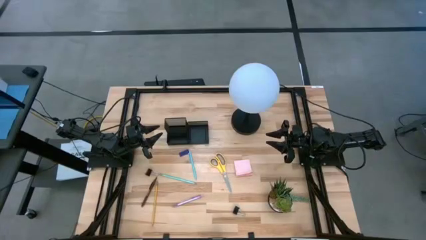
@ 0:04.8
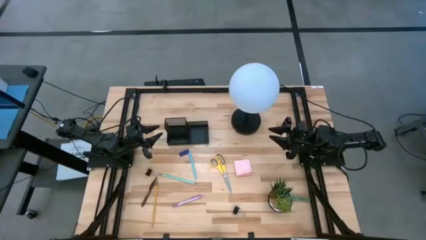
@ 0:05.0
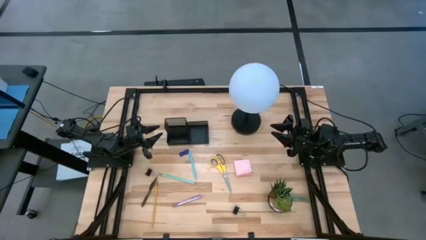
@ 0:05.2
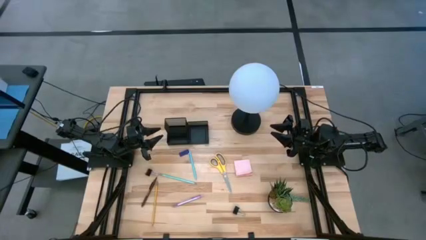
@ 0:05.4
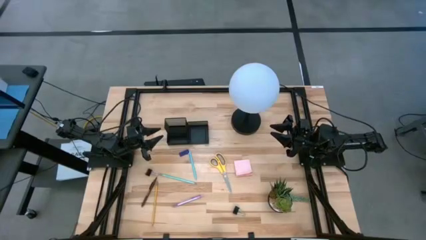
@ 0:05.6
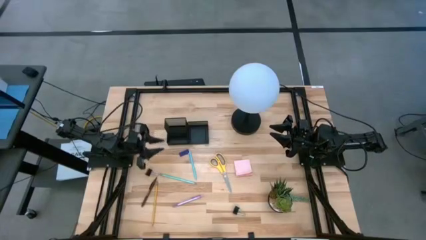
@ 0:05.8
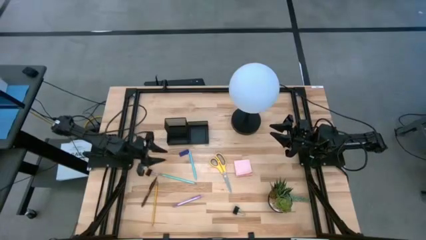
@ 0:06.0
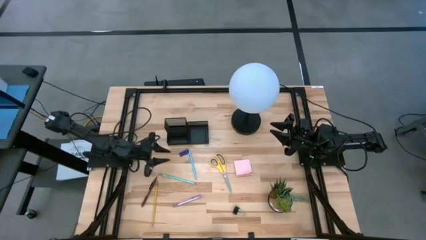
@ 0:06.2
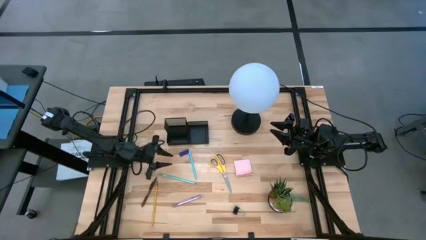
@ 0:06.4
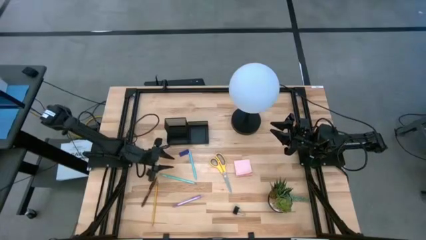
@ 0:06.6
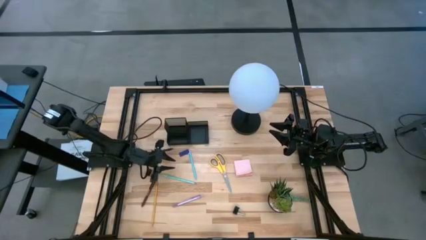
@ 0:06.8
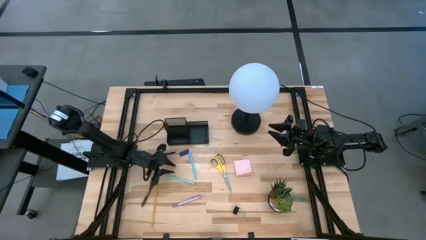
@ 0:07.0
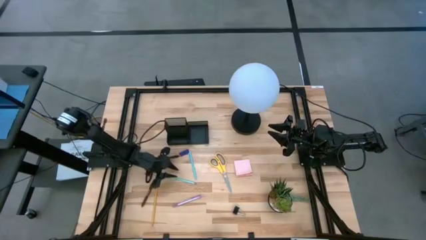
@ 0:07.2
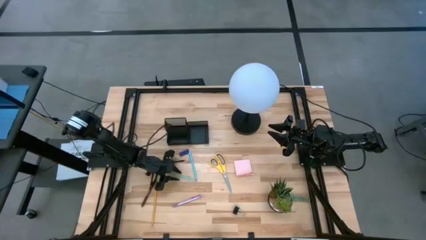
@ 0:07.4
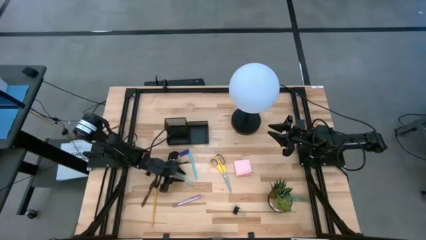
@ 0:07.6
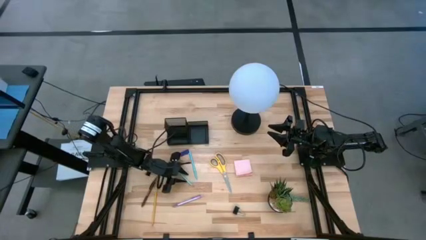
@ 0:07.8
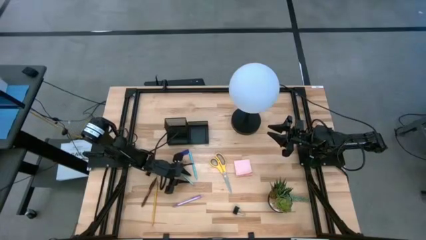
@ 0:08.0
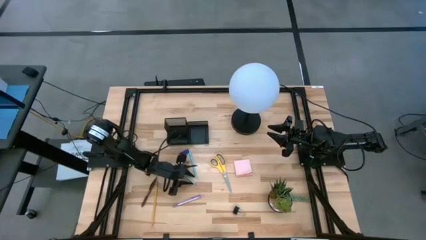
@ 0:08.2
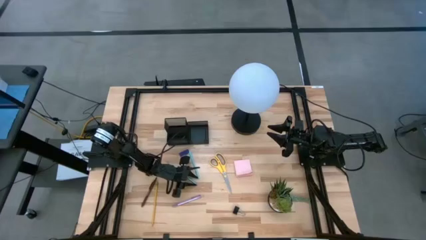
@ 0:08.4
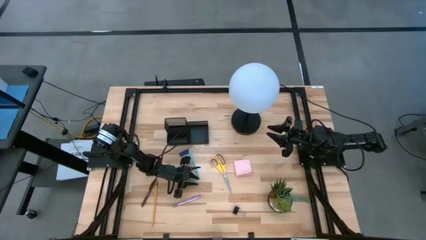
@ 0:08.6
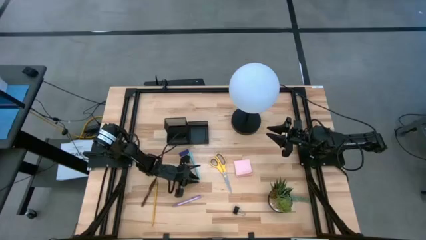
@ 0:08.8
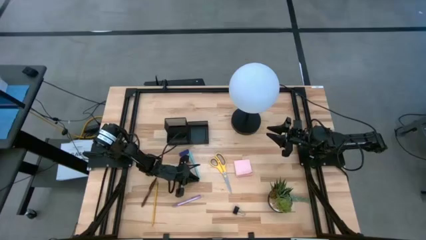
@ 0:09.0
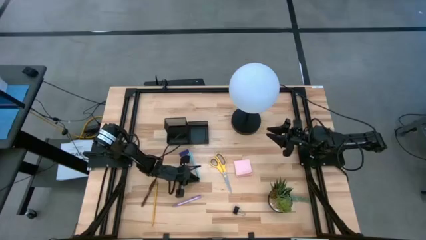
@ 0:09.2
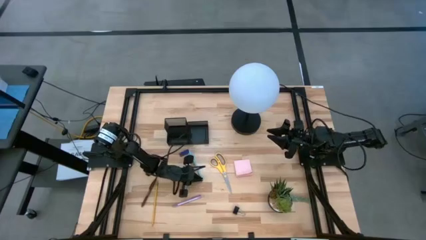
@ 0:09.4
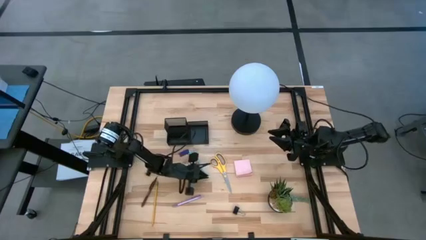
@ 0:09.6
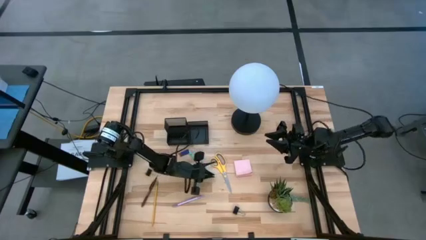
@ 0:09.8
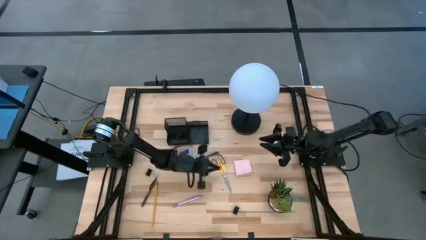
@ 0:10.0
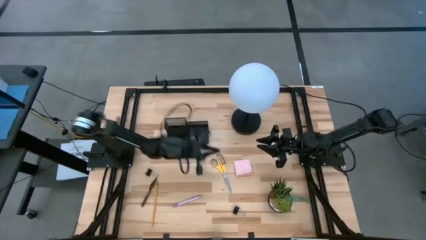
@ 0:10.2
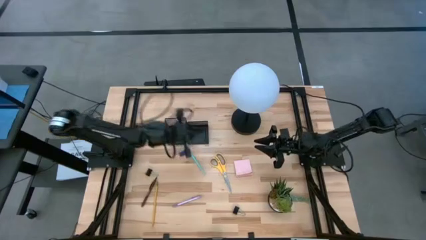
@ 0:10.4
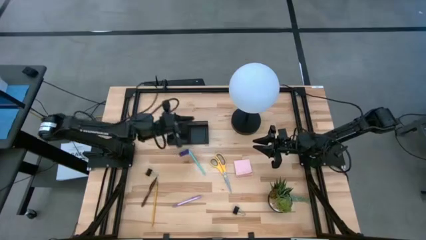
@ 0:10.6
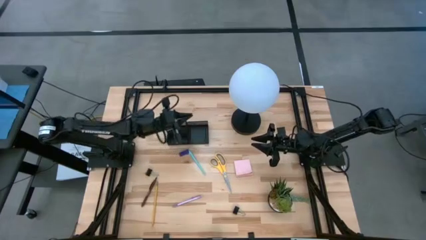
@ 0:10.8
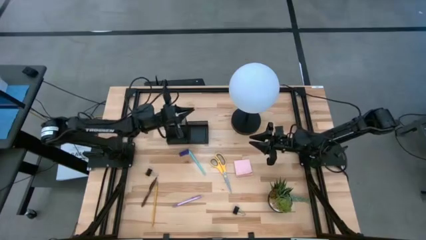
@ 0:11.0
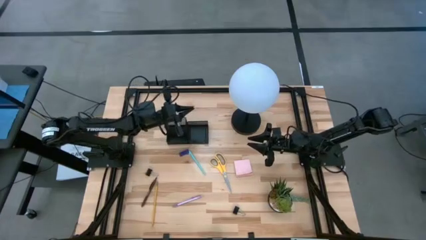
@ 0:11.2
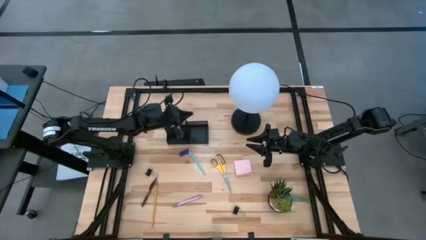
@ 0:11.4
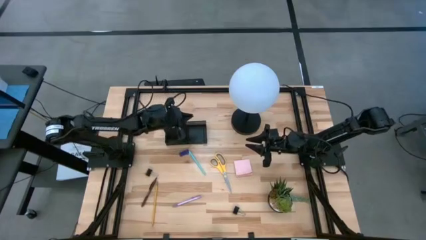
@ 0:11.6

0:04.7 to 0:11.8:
Task: Pick and place office supplies into organizer
Put the bottom left blue pencil into the black desk organizer

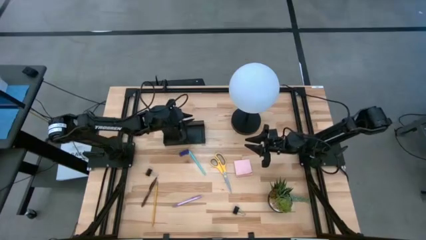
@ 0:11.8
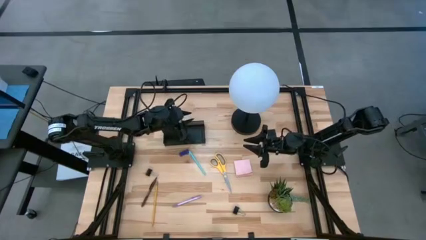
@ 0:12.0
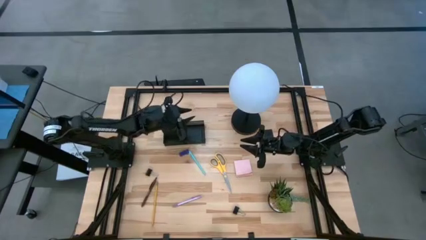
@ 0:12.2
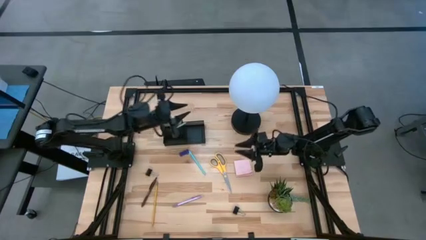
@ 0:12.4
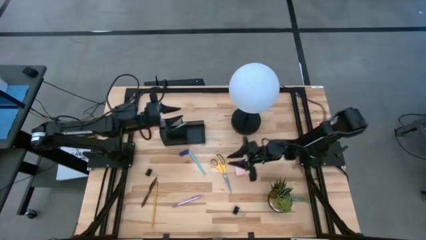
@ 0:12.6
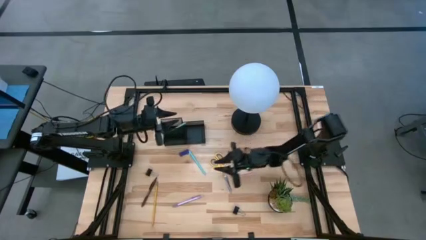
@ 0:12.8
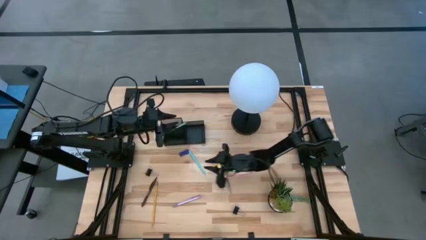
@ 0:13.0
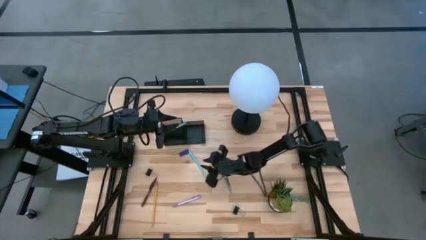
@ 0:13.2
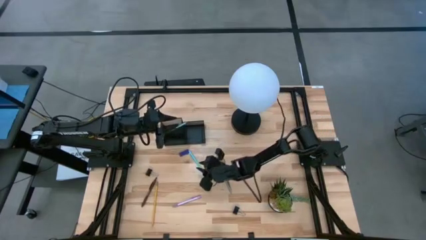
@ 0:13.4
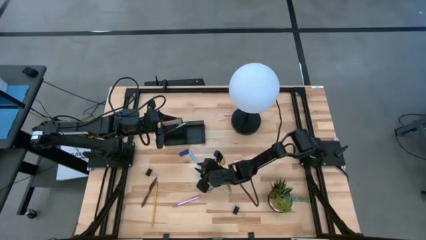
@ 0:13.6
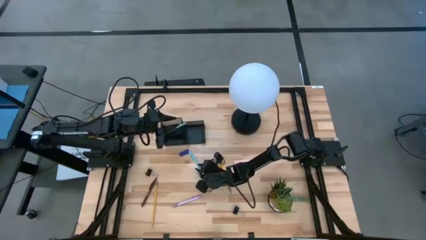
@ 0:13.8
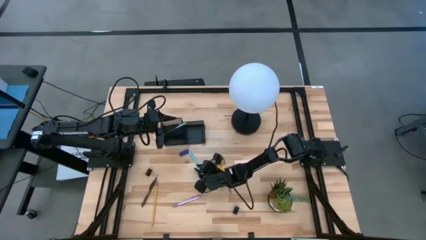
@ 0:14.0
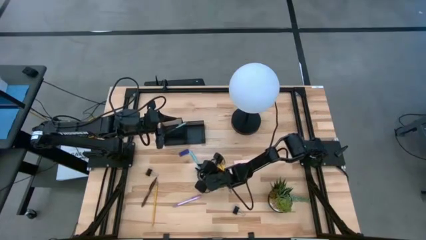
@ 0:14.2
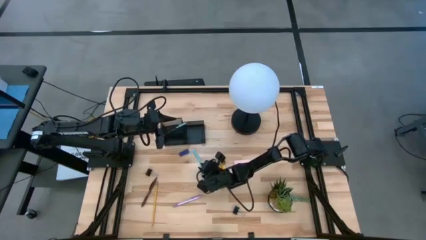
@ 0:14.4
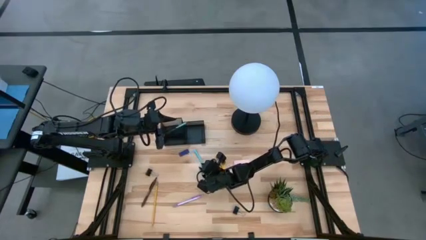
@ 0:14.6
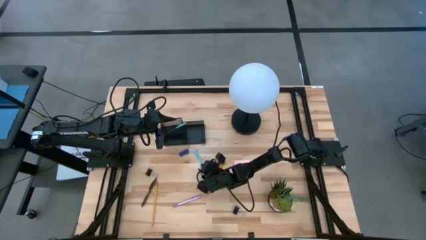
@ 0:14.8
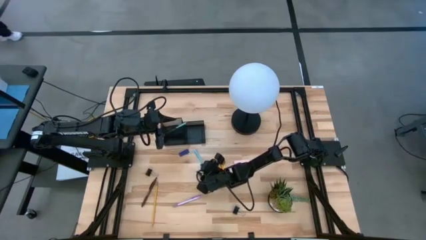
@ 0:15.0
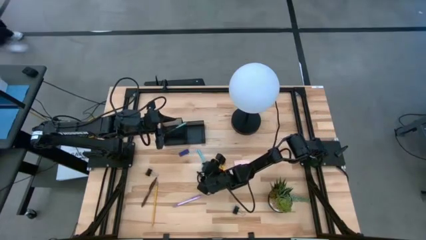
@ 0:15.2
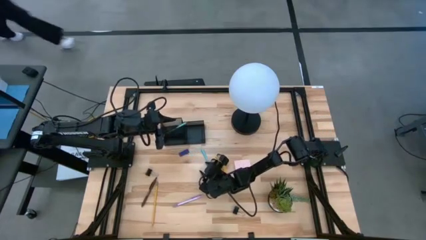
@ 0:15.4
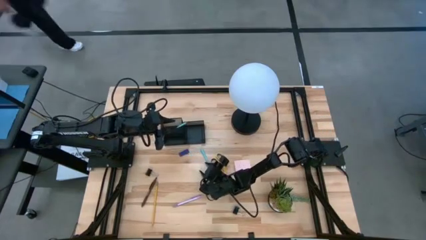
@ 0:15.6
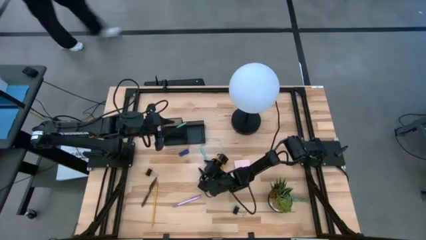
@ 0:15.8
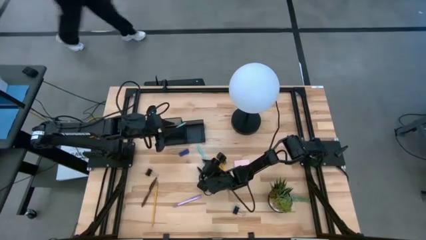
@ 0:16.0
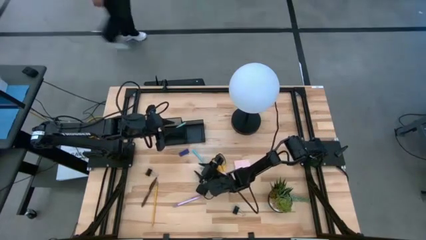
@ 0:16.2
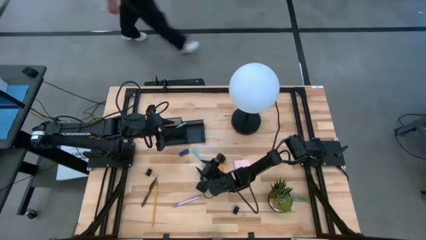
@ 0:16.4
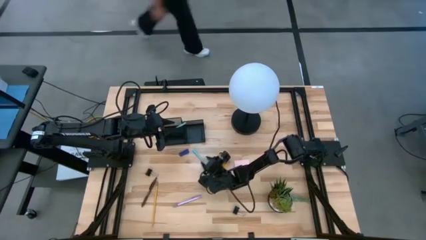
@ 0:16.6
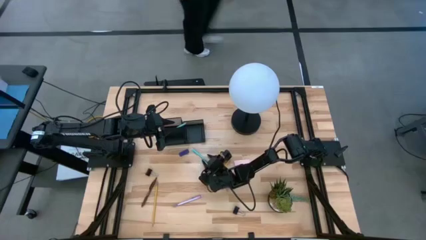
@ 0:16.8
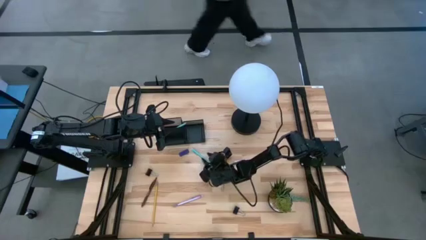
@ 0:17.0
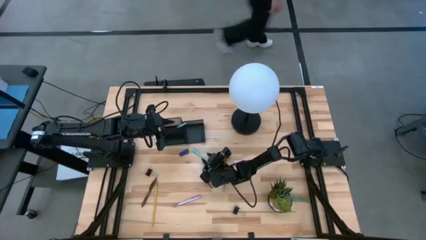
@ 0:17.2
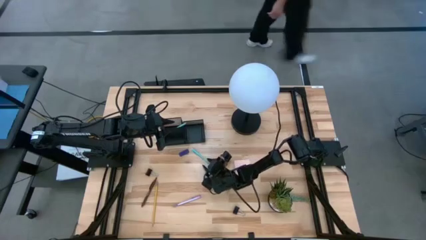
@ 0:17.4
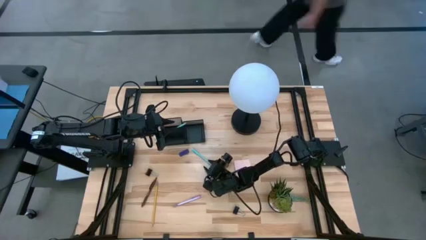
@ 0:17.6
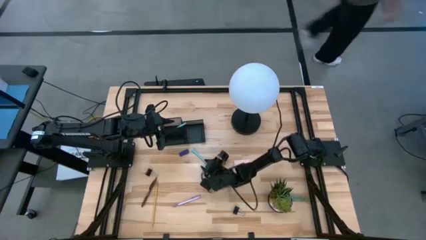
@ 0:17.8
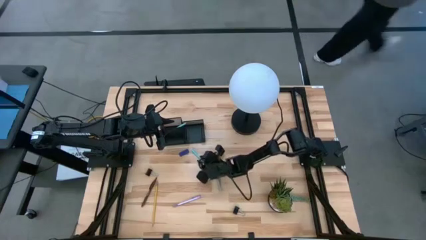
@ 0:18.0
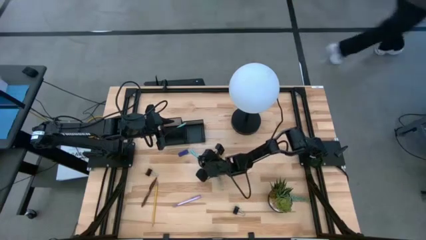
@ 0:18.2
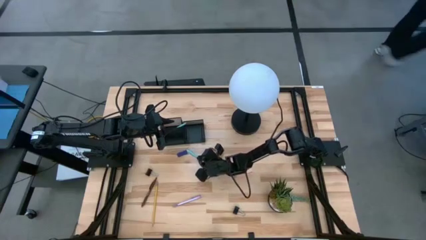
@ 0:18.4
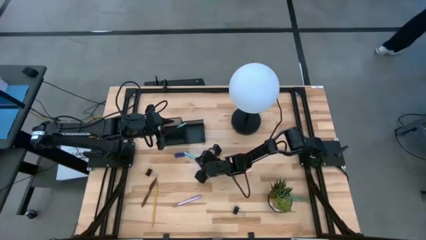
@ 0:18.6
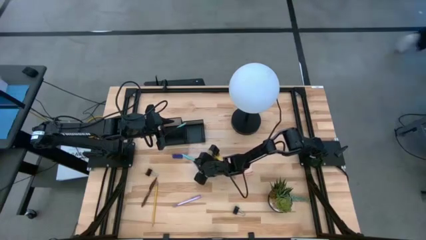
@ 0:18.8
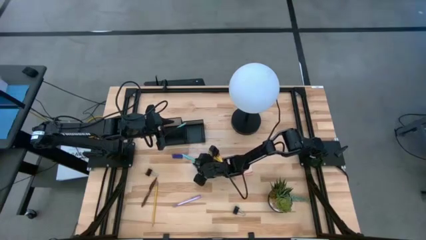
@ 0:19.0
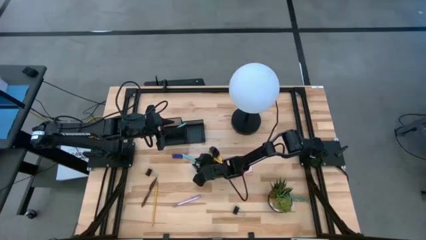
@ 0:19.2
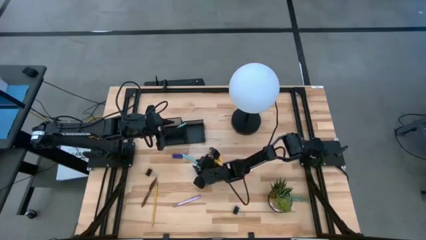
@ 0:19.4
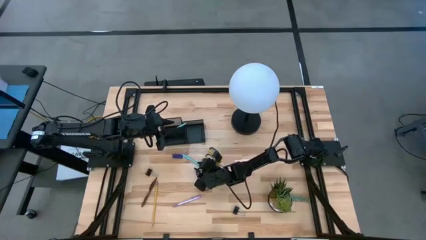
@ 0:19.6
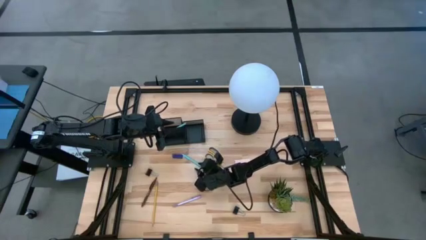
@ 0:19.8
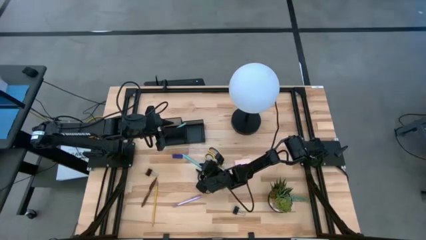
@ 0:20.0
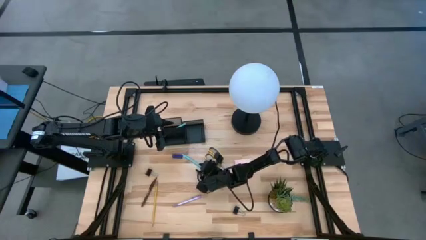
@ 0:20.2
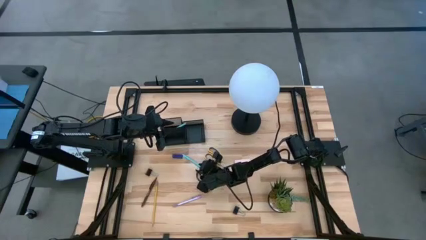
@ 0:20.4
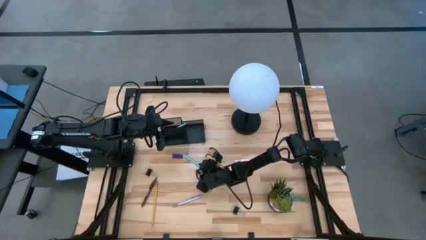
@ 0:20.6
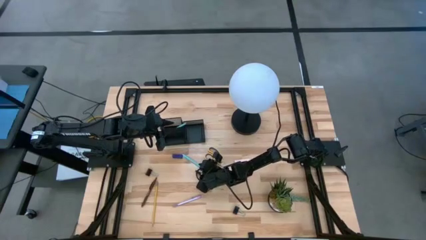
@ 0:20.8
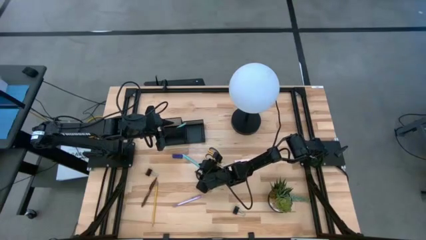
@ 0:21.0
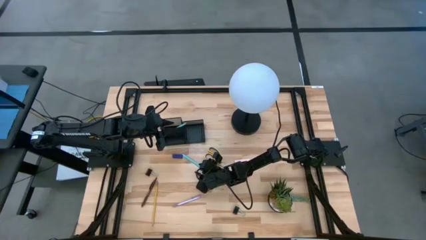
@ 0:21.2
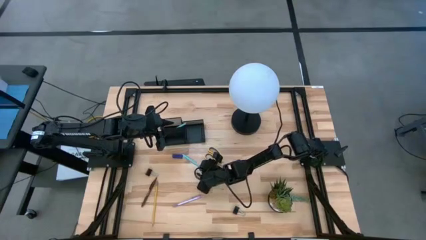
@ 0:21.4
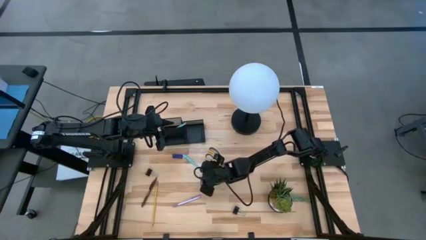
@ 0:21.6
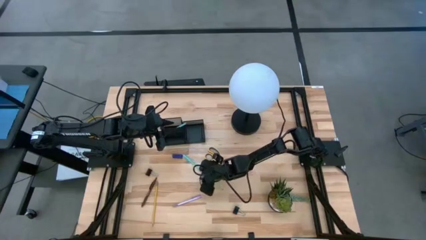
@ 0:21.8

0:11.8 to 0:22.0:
Put the blue pen into the black desk organizer
